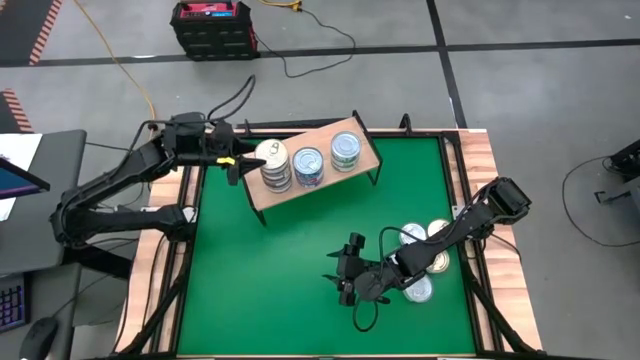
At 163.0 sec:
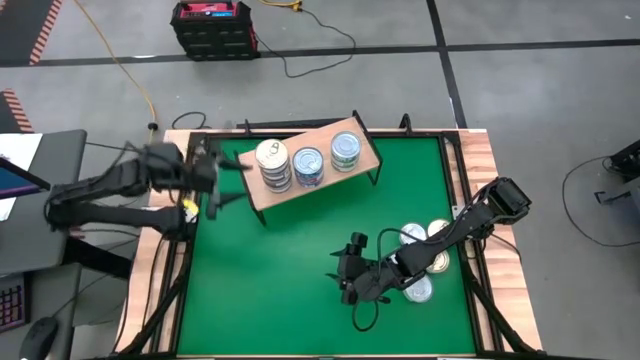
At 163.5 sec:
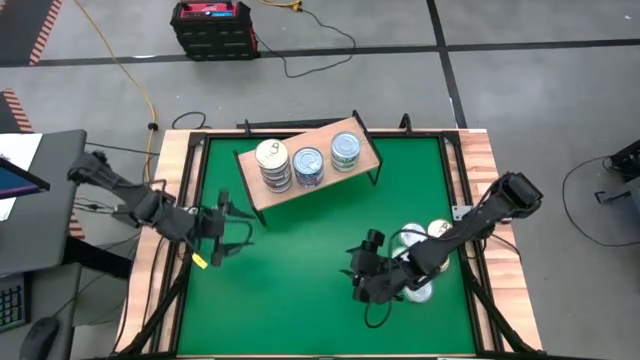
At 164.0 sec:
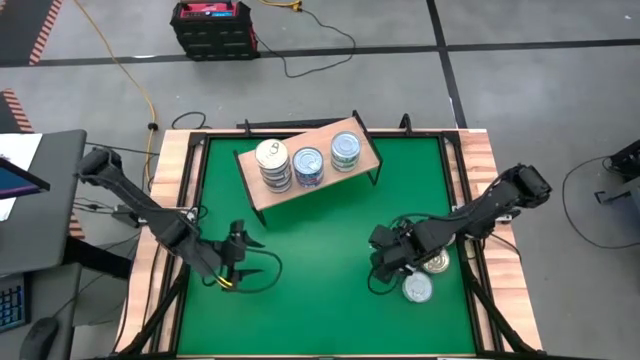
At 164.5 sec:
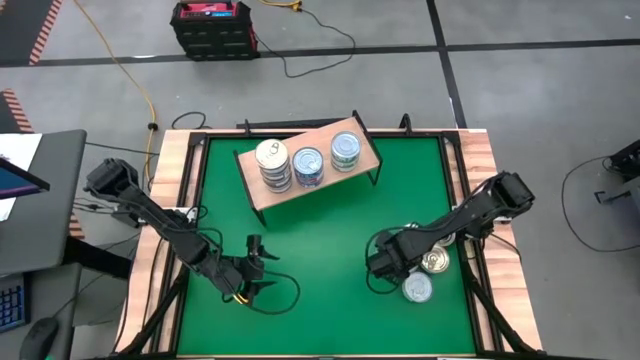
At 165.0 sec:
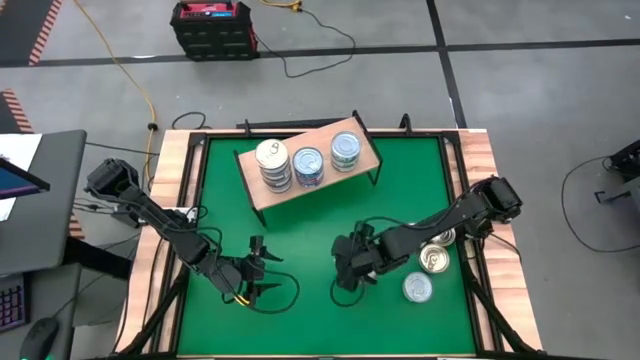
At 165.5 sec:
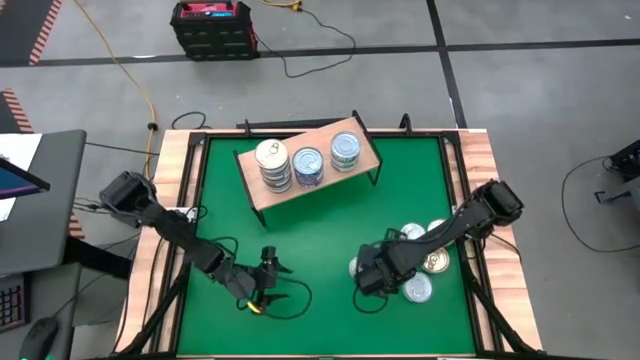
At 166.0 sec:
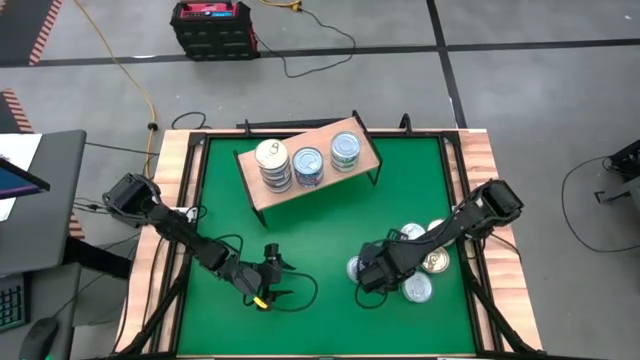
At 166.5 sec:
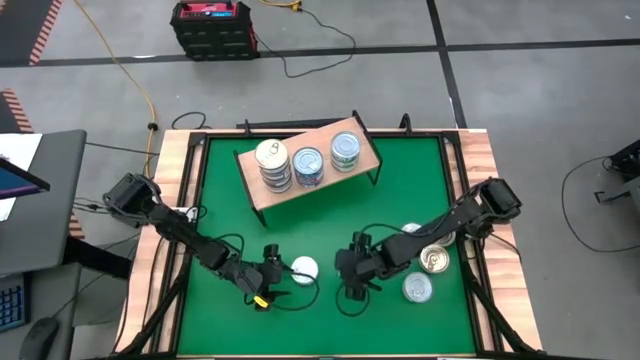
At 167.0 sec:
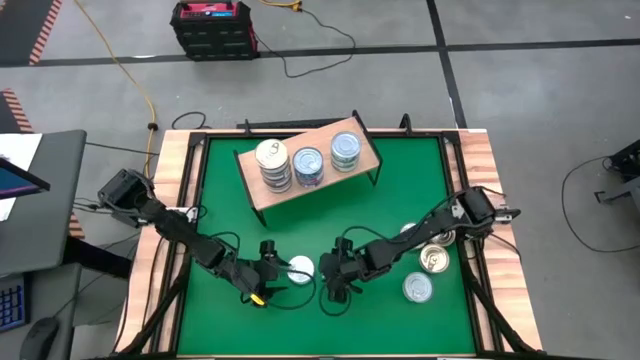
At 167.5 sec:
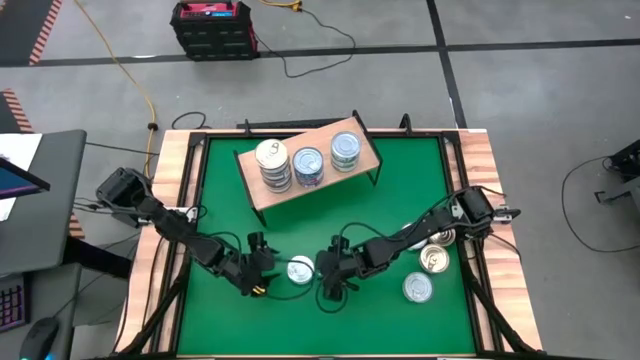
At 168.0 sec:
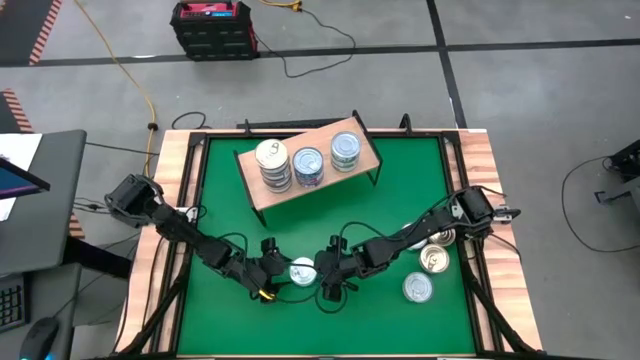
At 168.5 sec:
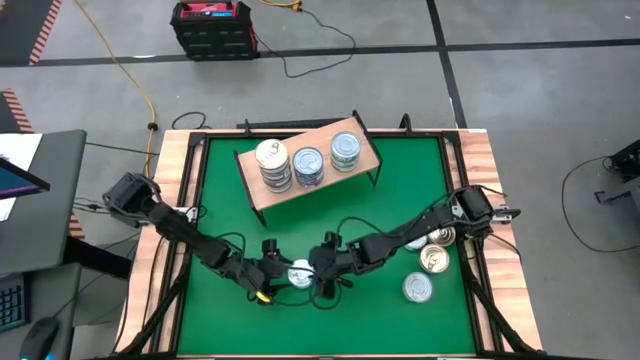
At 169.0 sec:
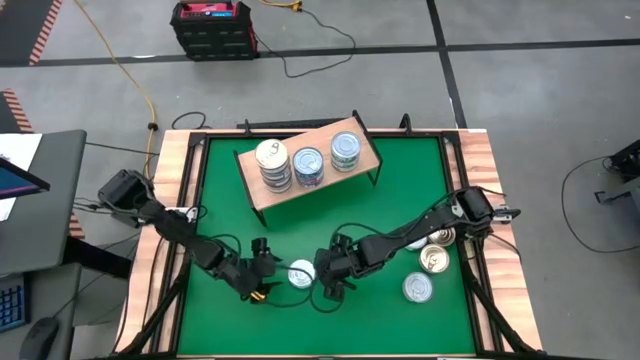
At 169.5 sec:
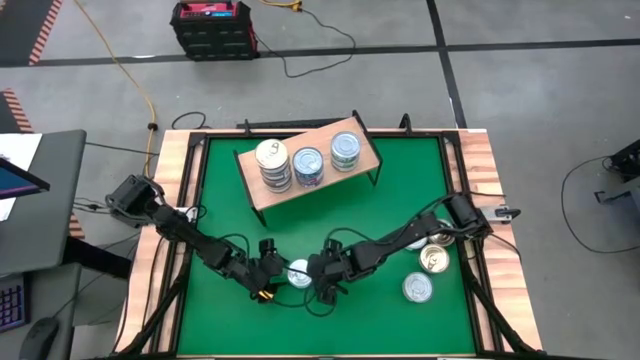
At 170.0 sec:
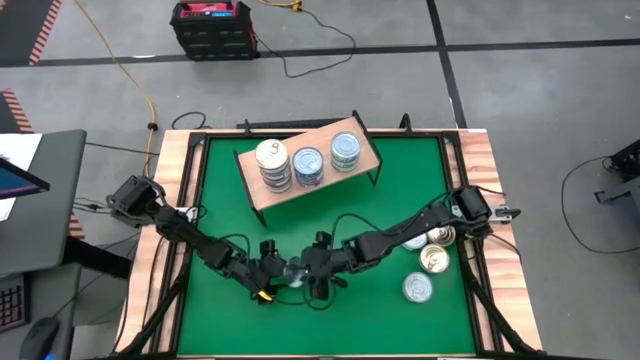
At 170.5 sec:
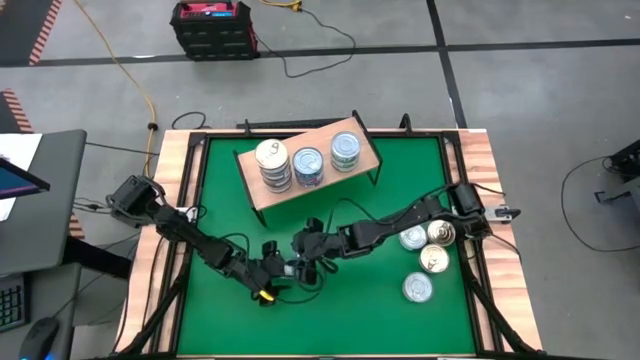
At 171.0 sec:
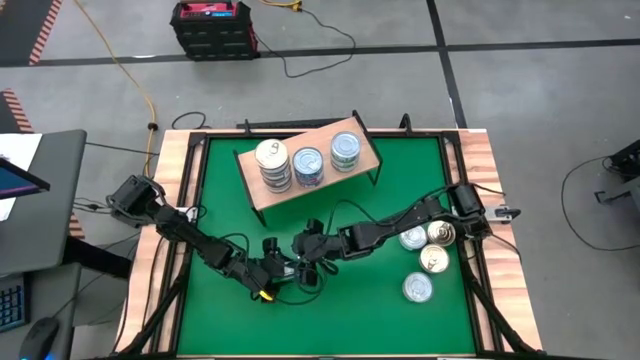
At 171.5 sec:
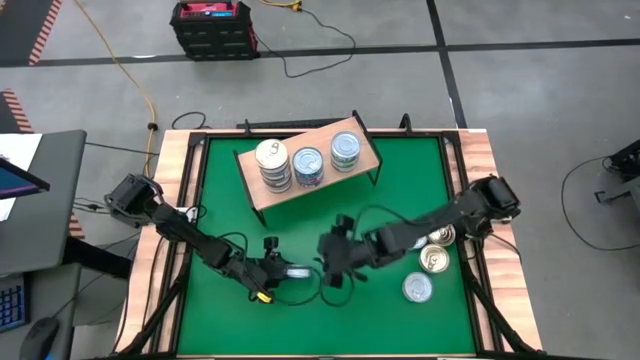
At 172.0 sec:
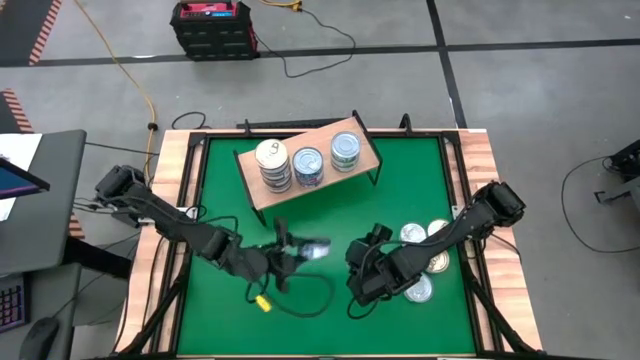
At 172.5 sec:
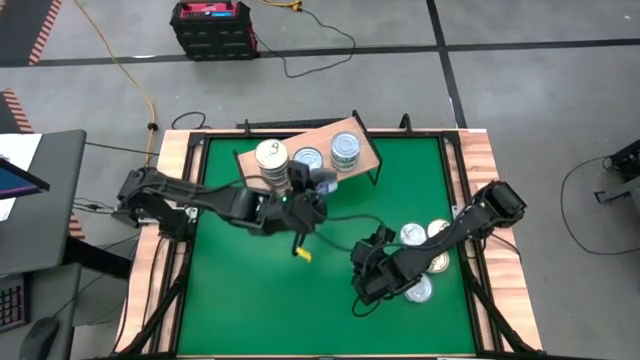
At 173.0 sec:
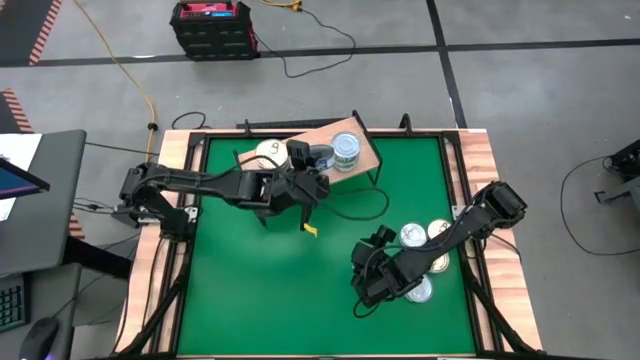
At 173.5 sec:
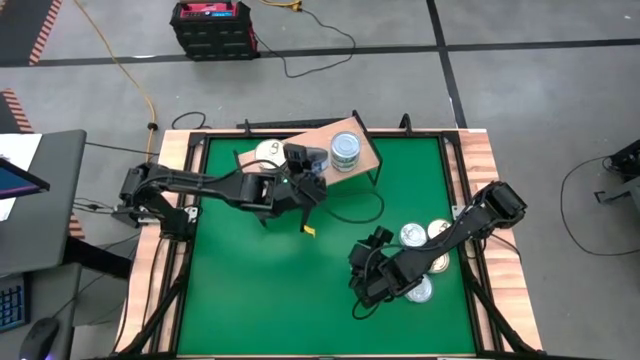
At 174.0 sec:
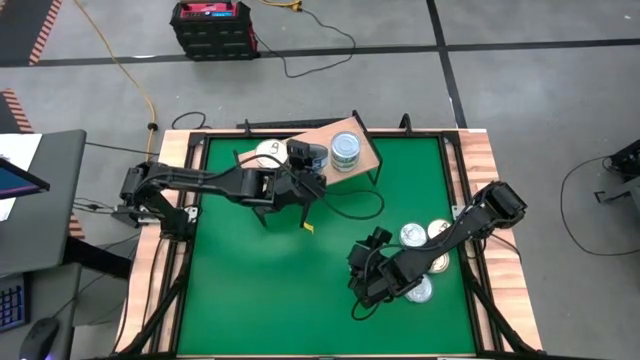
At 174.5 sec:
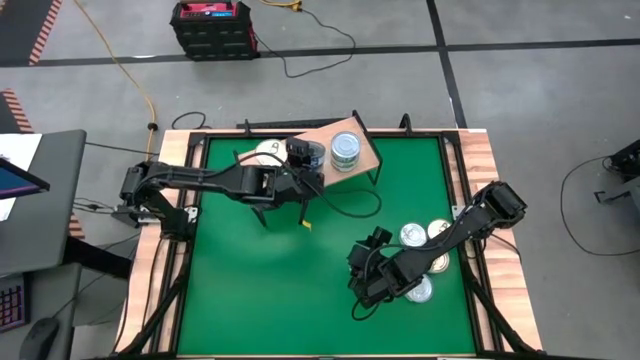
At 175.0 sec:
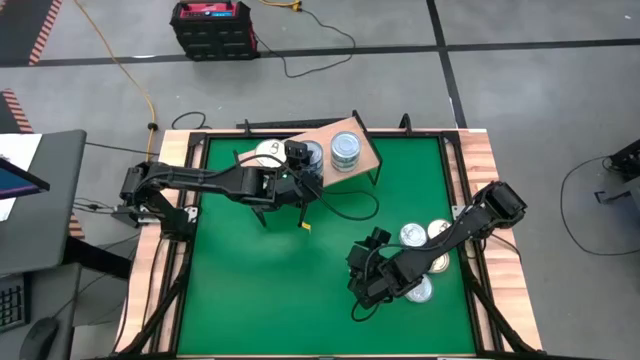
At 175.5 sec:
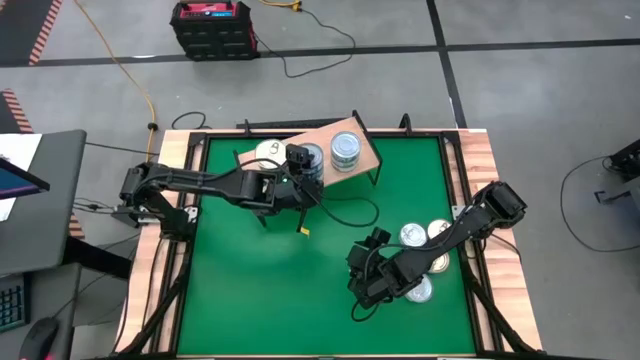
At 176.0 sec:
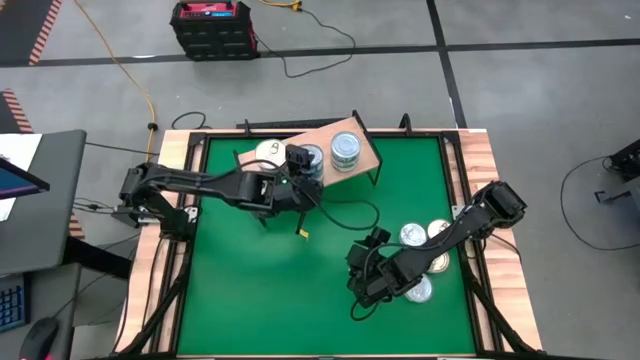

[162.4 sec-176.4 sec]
Task: Stack canned seafood by type on shelf
Stack the blue tuna can on top of the blue tuna can on the shelf

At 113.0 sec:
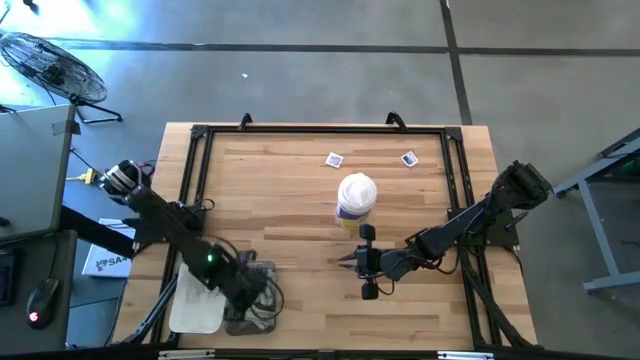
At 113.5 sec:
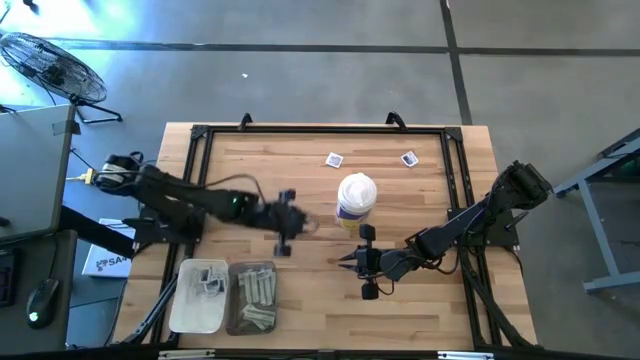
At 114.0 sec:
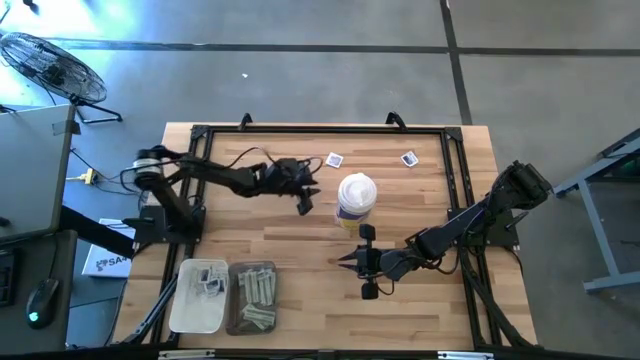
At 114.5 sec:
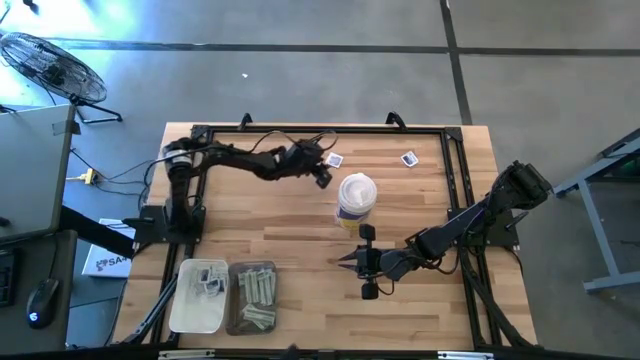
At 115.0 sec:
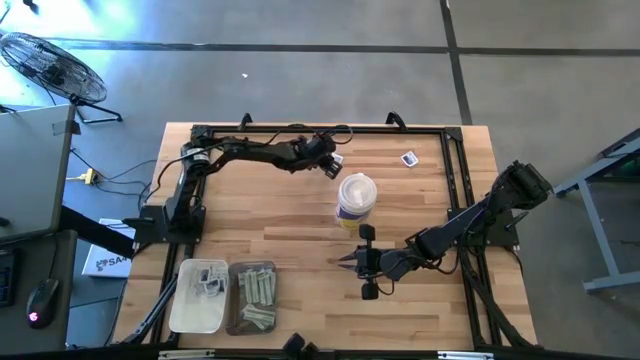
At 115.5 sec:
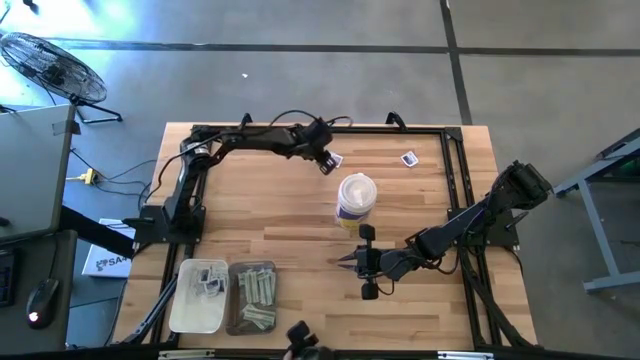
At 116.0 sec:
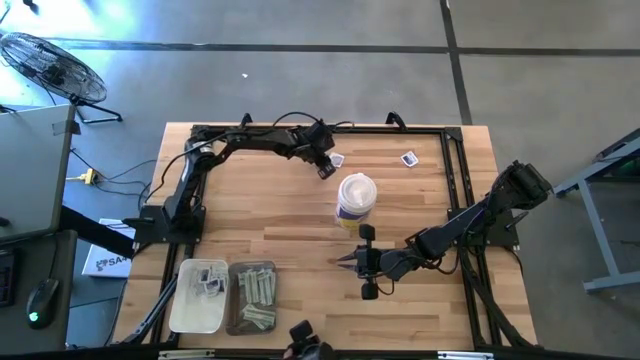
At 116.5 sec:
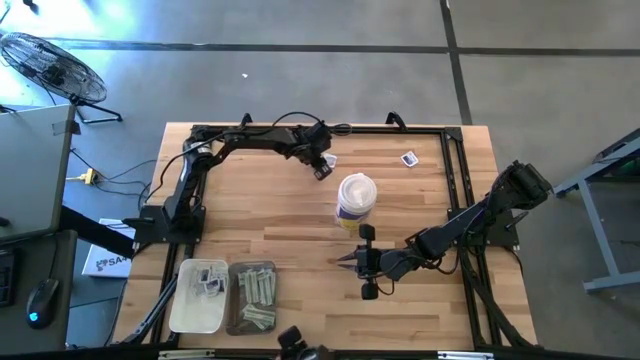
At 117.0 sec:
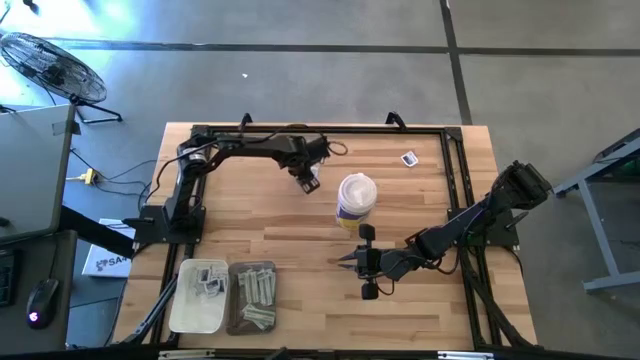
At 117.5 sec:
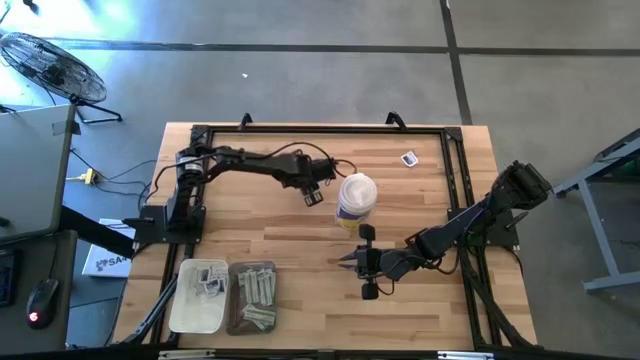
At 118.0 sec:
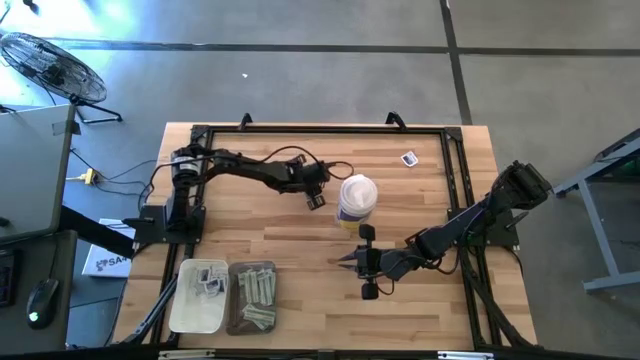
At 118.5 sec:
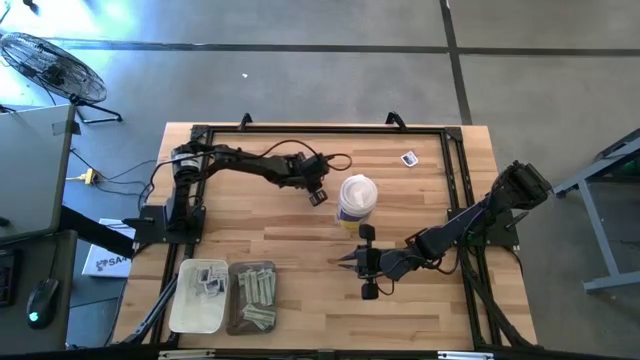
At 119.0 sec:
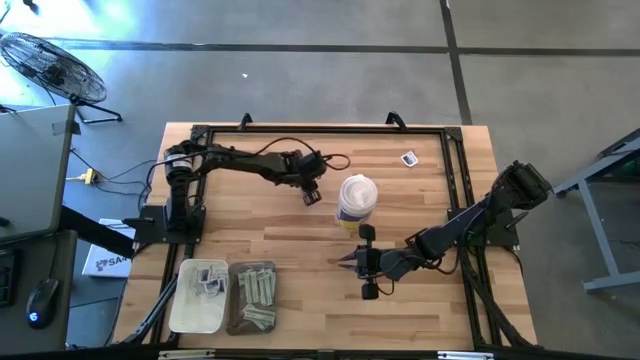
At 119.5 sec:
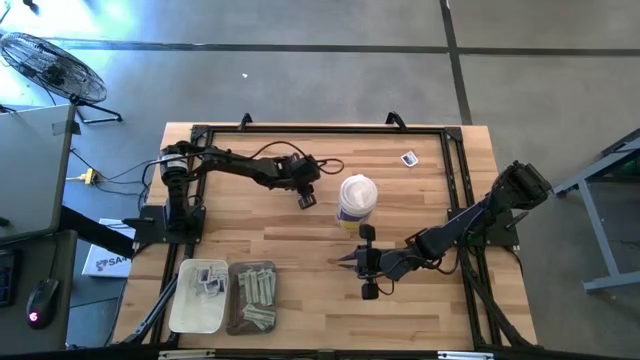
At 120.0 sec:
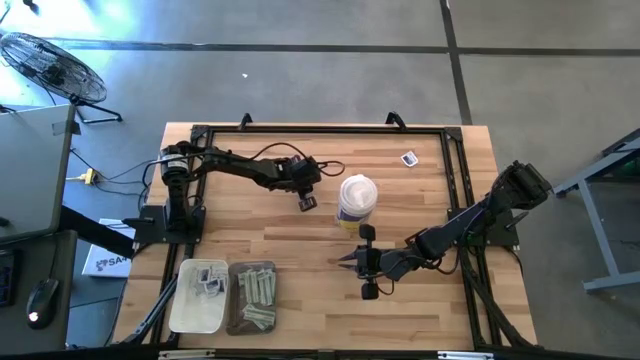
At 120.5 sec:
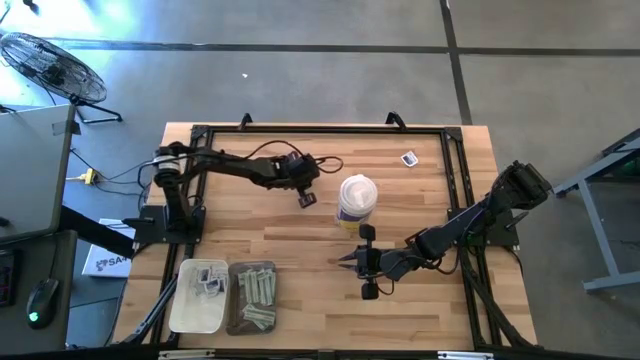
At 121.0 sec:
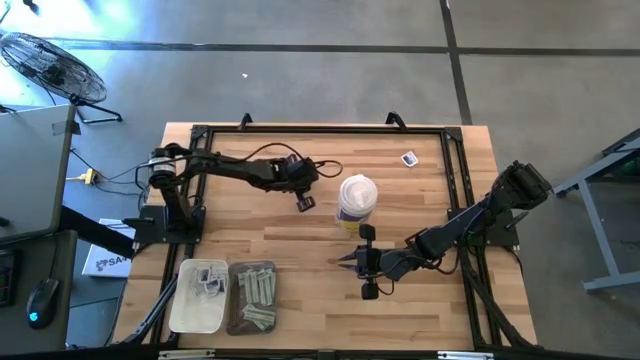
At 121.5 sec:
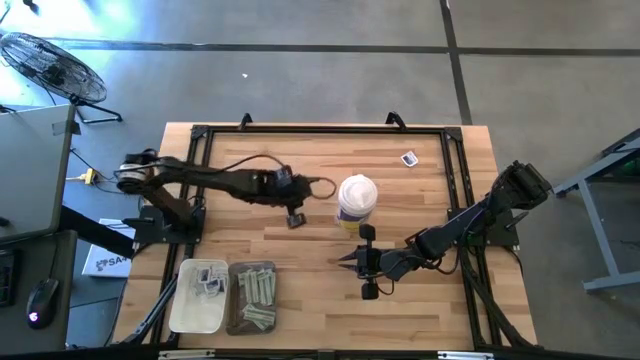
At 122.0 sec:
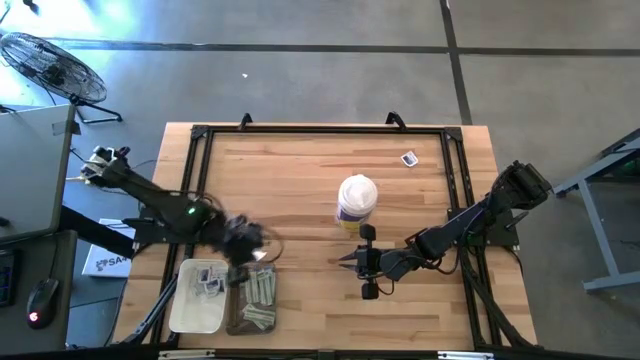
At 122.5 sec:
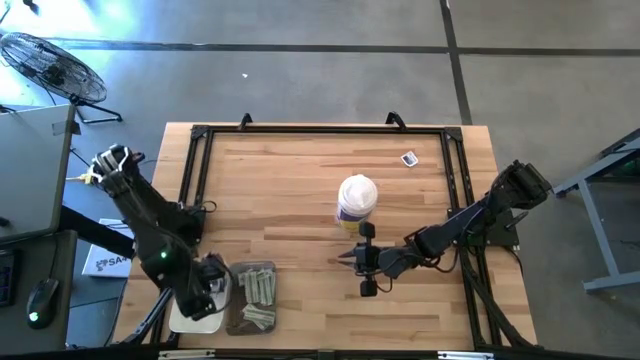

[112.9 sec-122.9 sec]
Task: Pick & Place First Aid Supplies
Put the alcohol pad into the white bin
